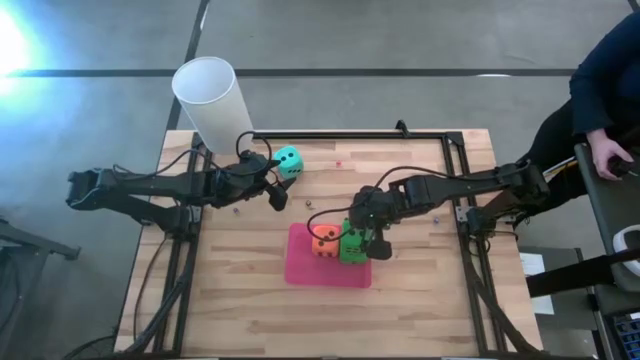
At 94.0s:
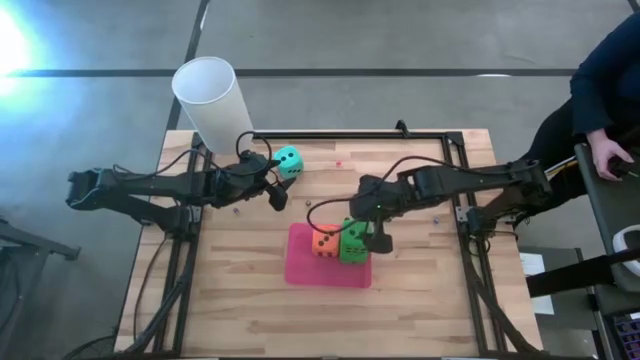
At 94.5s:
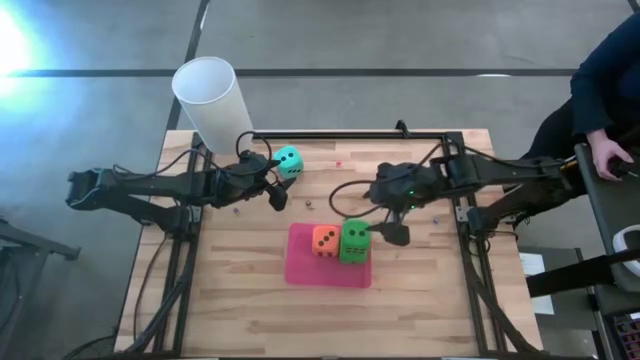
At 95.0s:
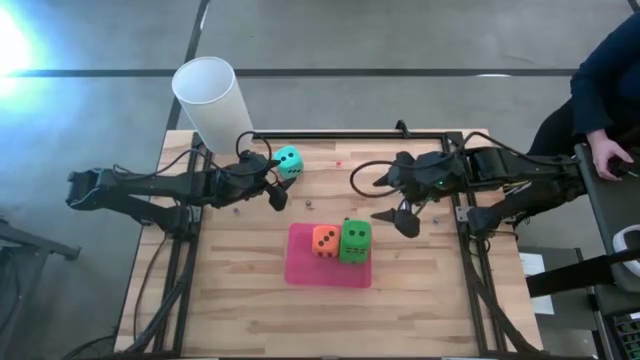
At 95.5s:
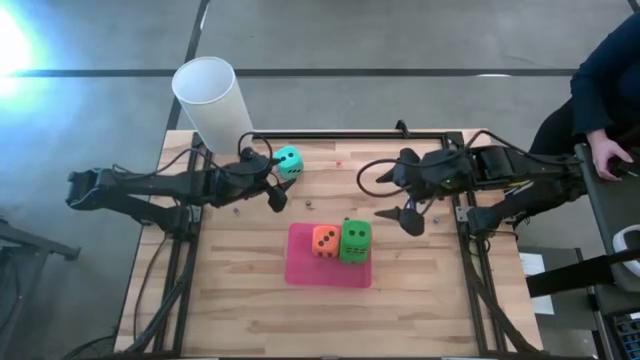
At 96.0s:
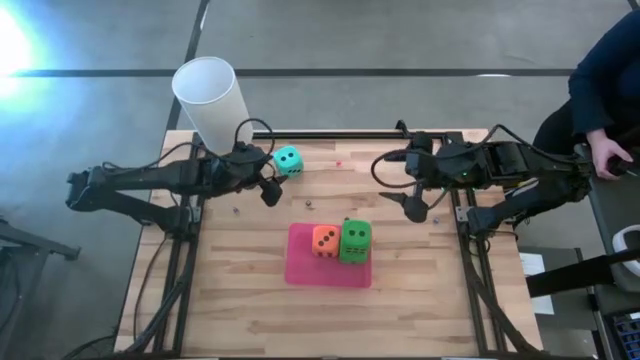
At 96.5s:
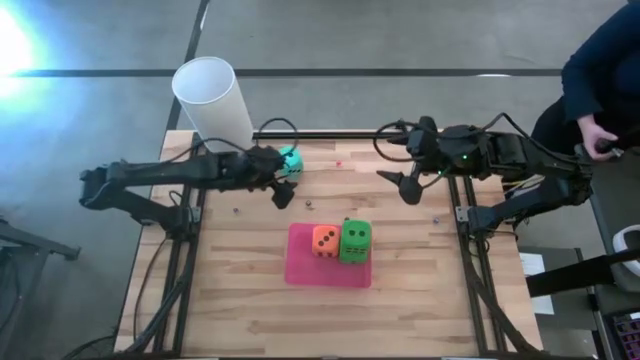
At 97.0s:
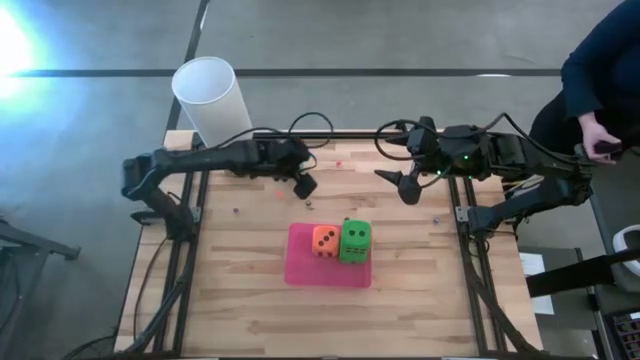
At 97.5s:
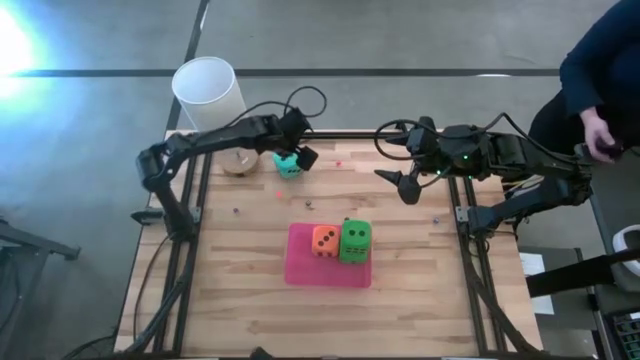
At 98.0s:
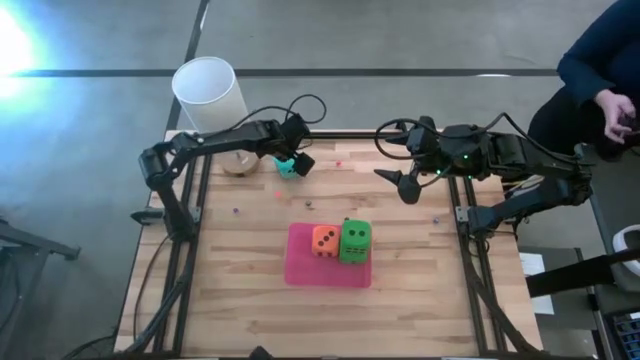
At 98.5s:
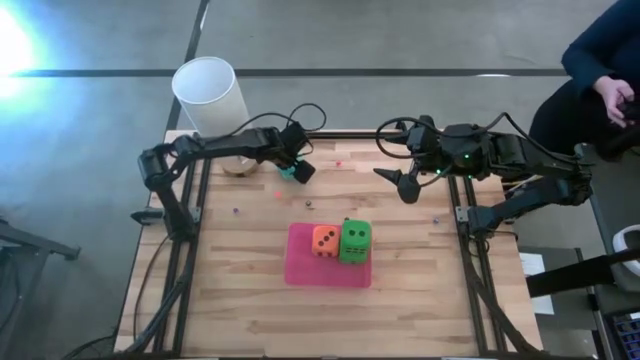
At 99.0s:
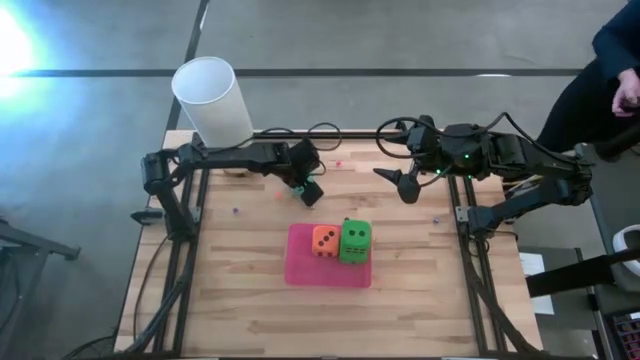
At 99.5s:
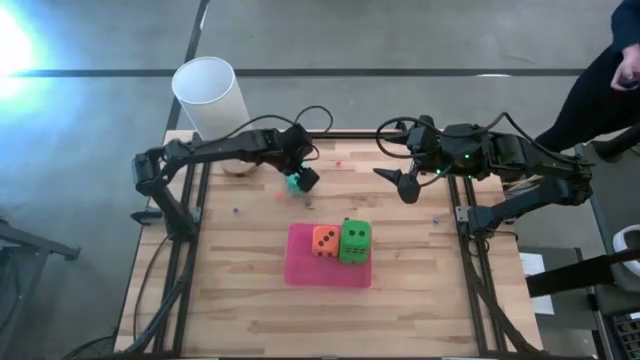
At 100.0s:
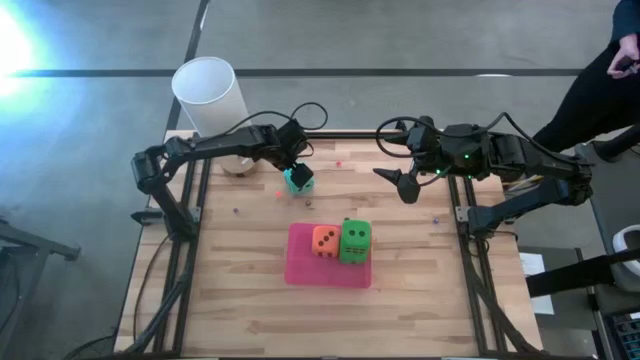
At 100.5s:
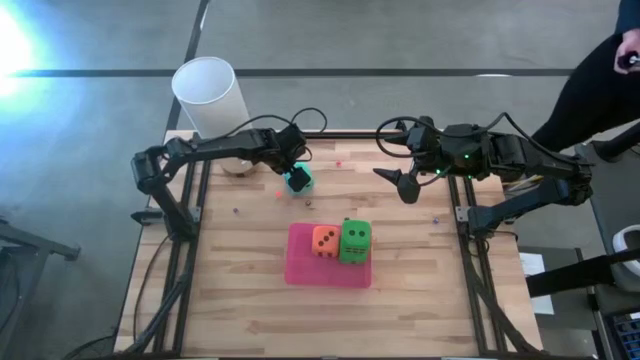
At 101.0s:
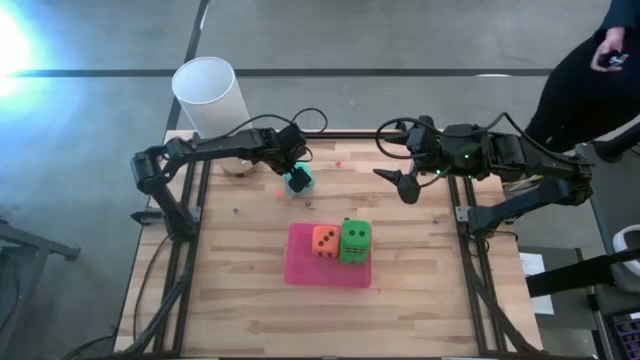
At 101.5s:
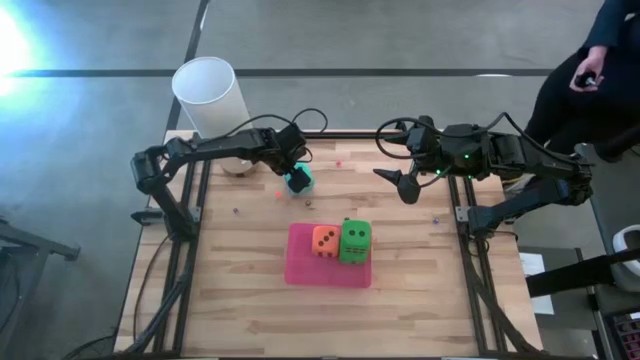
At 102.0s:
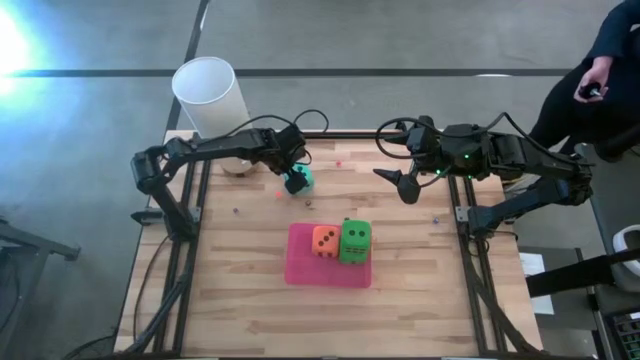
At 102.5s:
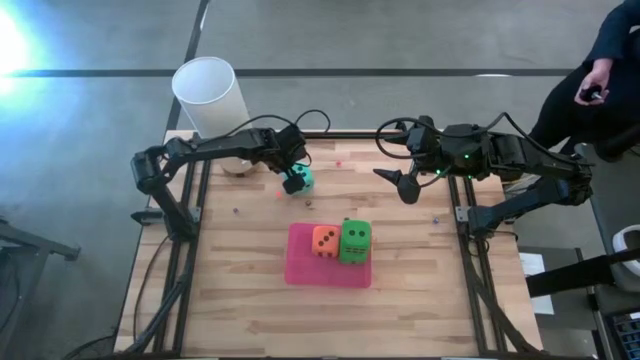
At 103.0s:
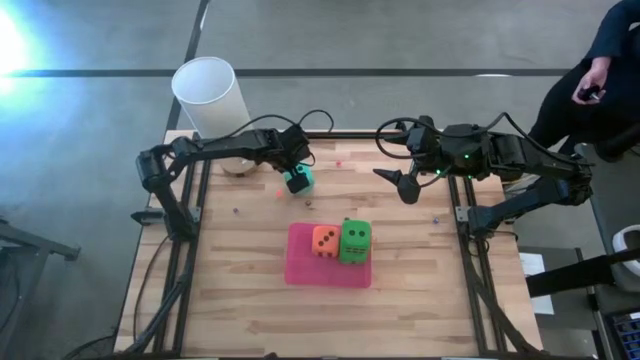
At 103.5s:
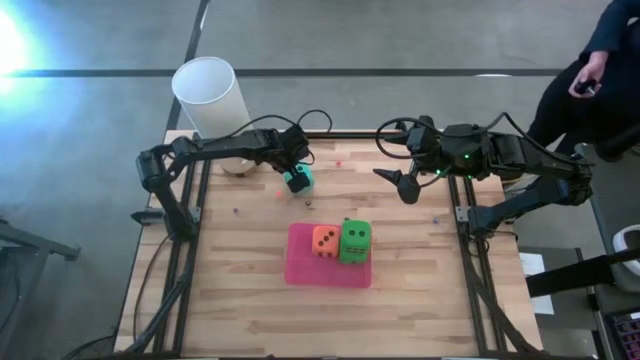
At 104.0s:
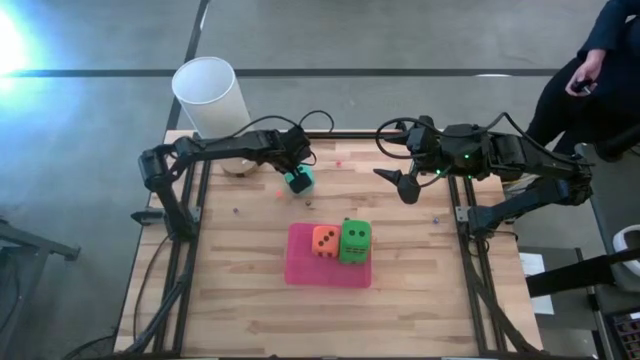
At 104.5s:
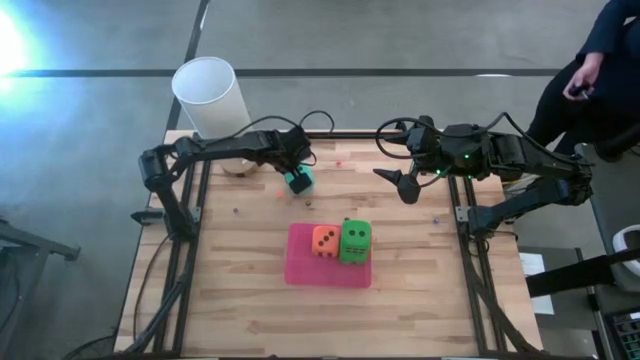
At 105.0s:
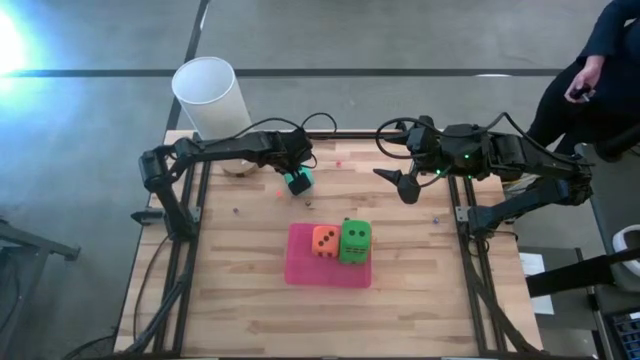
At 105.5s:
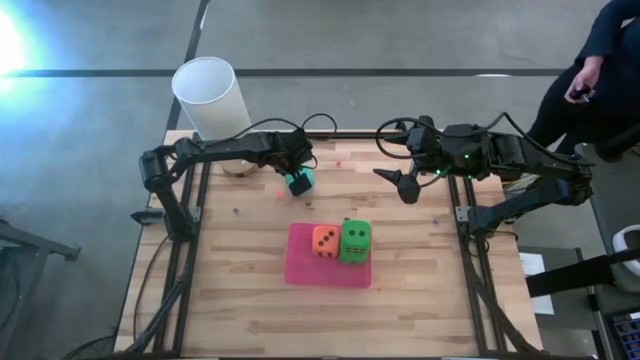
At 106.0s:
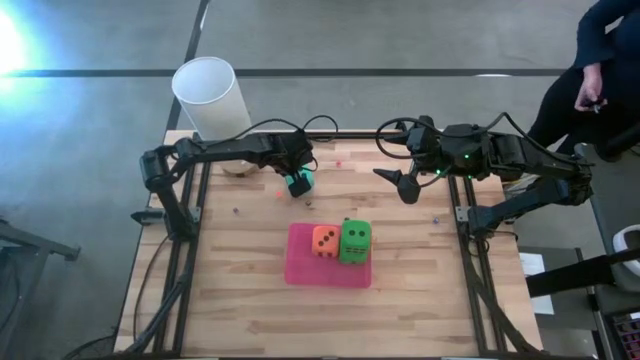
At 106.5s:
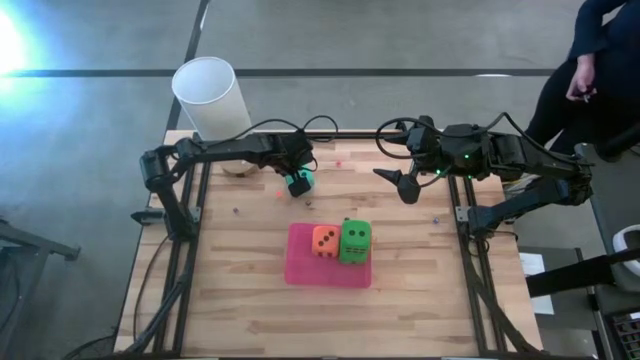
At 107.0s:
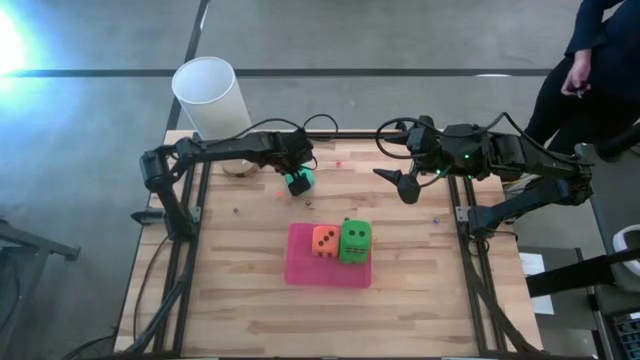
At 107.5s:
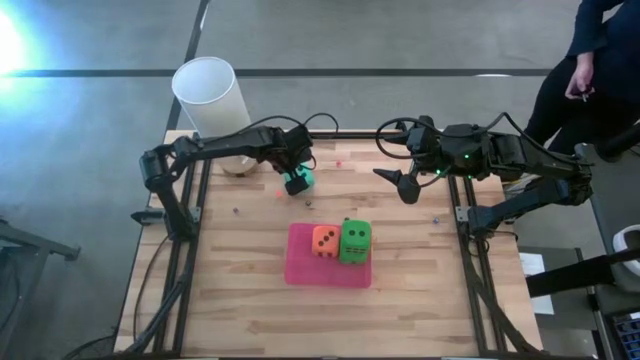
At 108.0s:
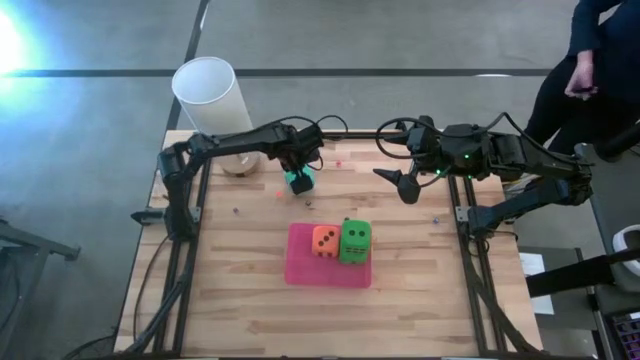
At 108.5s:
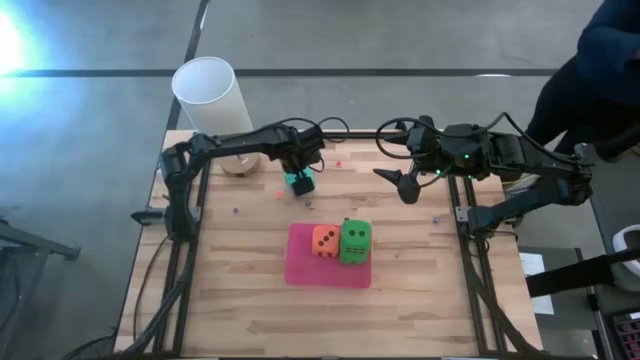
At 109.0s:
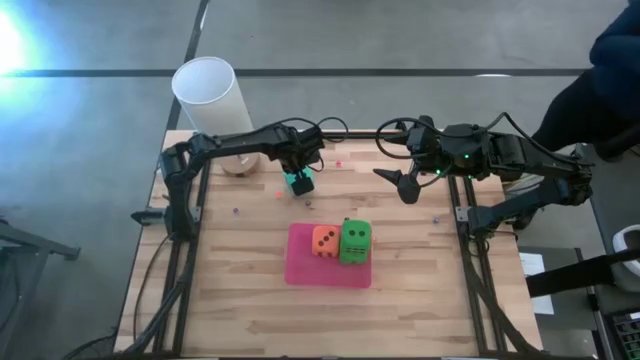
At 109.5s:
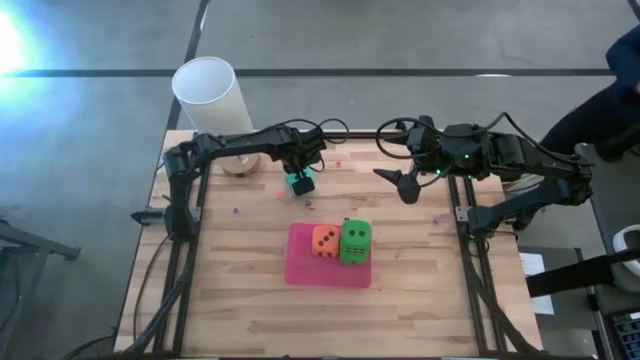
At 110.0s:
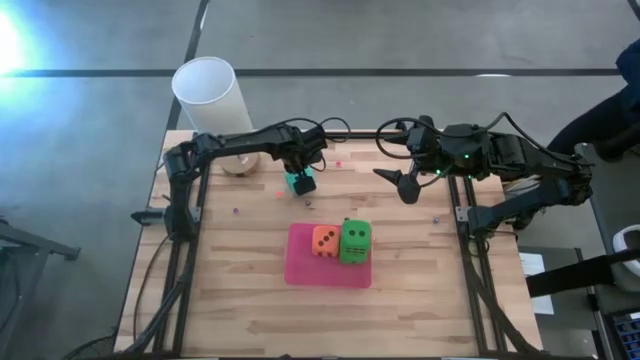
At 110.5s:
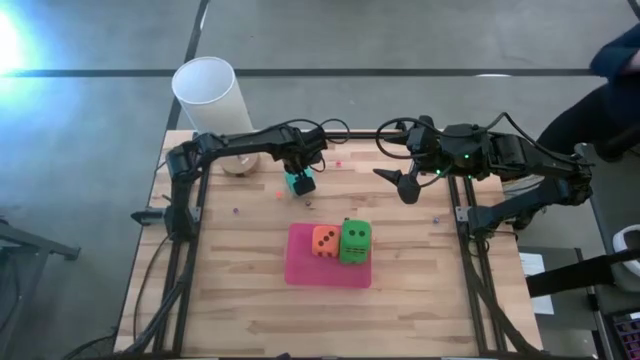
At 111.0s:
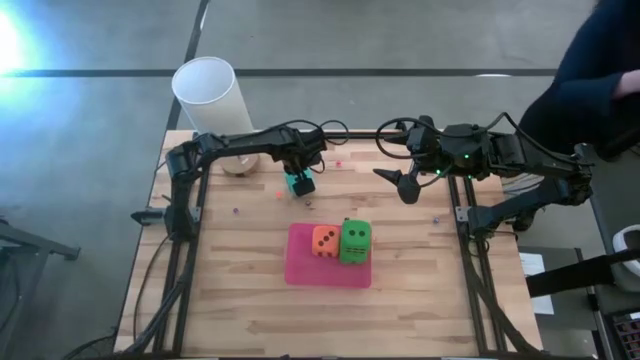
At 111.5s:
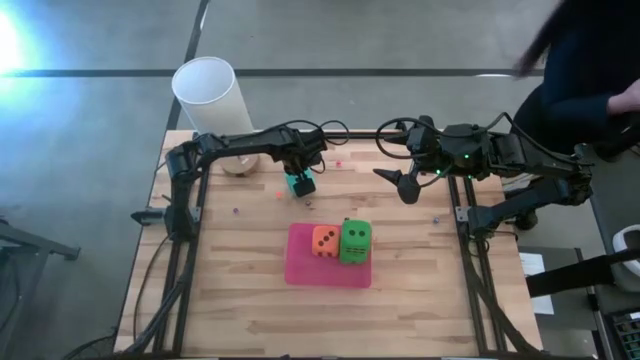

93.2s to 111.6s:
Task: Pick & Place Dice
Put the large blue dice into the pink bin

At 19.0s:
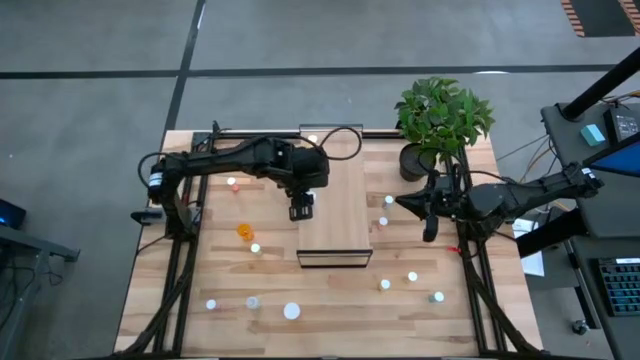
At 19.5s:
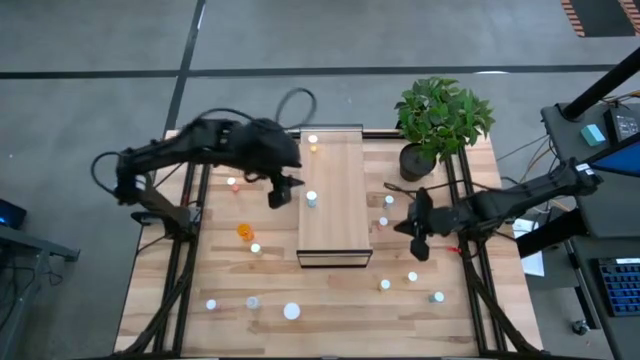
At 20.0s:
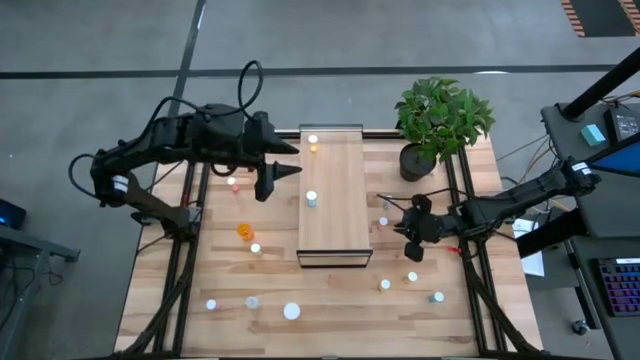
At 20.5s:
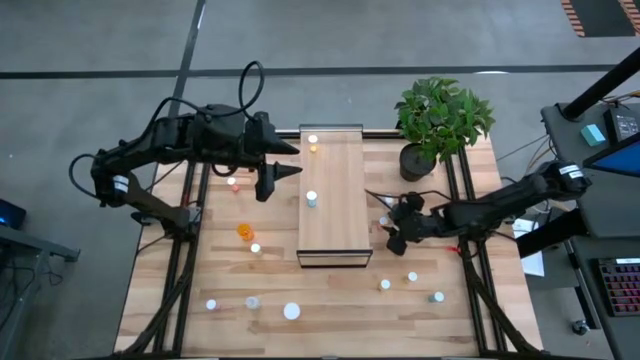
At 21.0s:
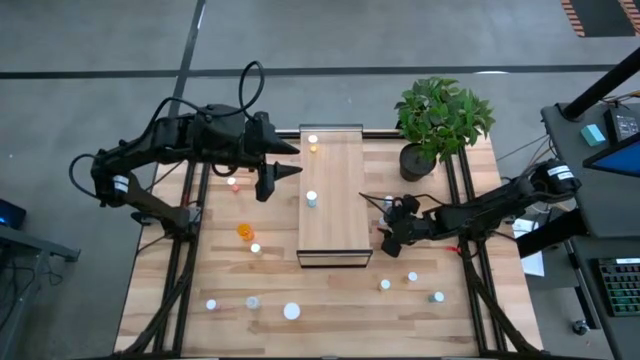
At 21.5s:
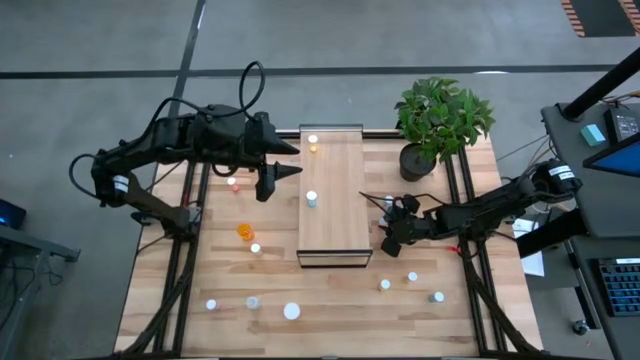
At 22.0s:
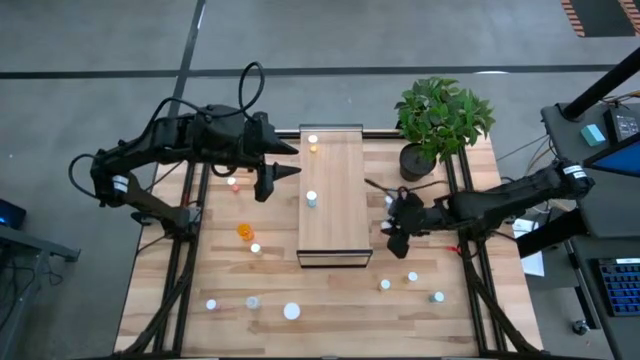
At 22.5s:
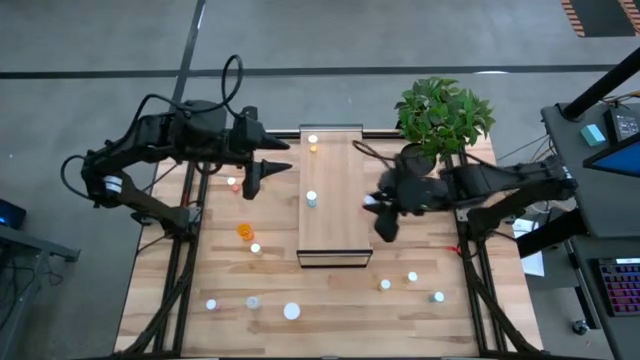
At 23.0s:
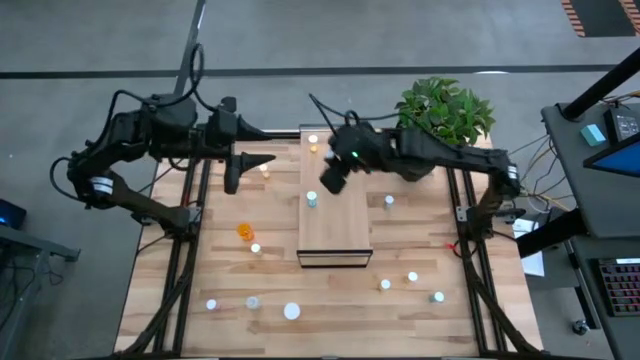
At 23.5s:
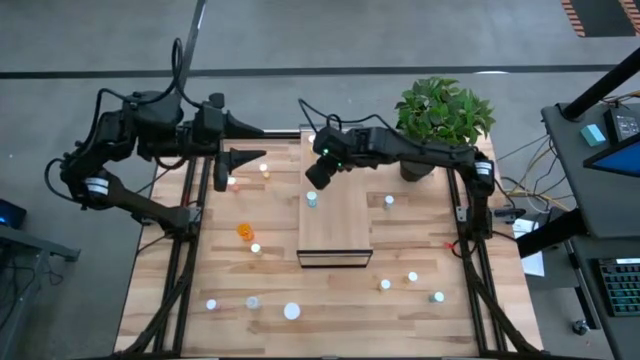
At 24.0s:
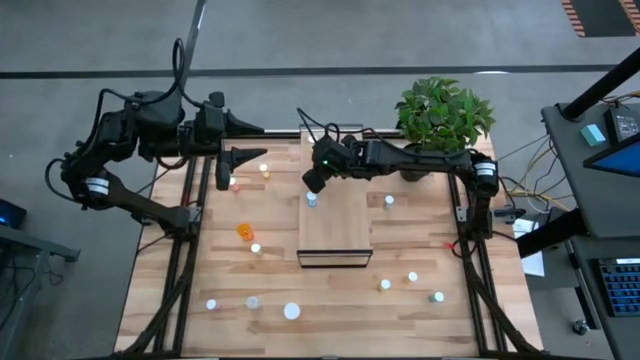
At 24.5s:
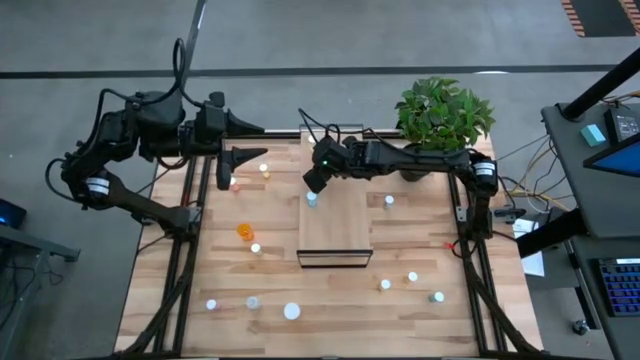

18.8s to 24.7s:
Task: Pick and place medicine bottles onto shelf by color
Put the right red bottle on the shelf
